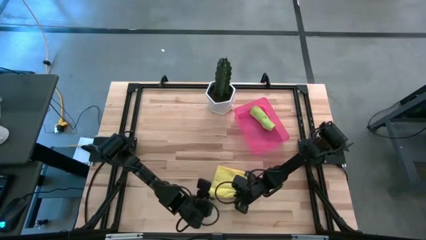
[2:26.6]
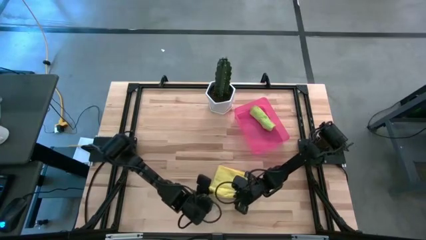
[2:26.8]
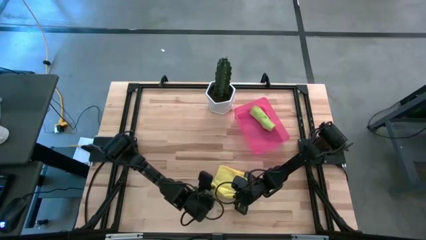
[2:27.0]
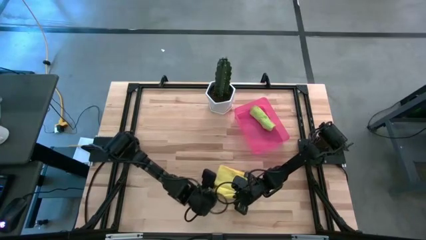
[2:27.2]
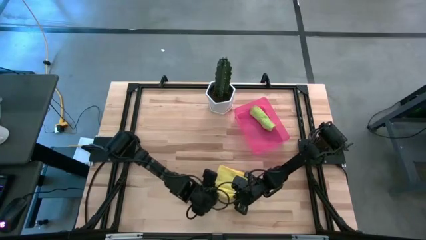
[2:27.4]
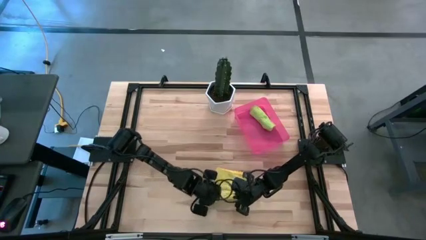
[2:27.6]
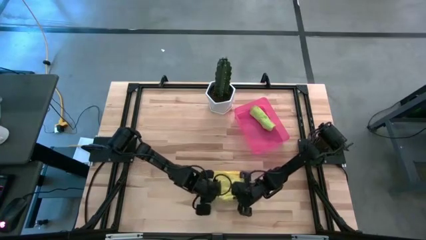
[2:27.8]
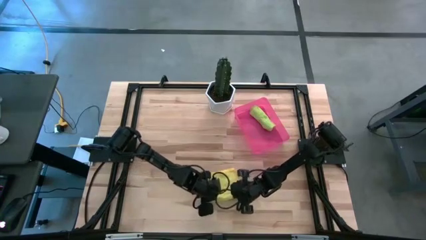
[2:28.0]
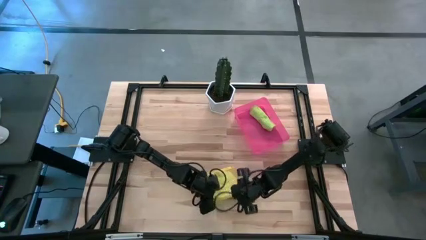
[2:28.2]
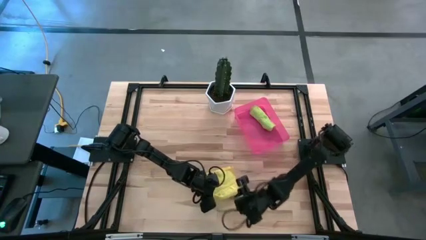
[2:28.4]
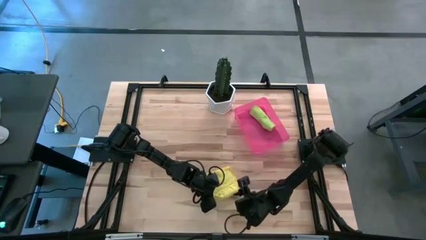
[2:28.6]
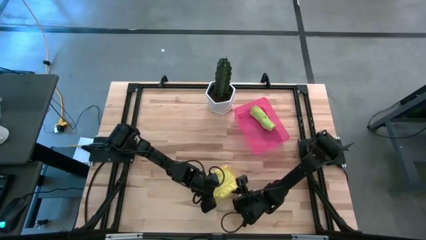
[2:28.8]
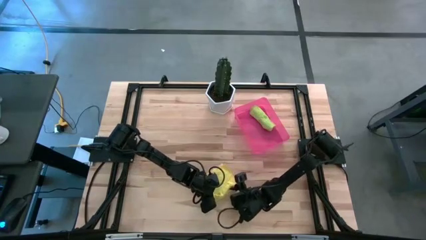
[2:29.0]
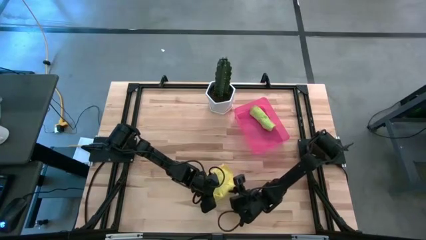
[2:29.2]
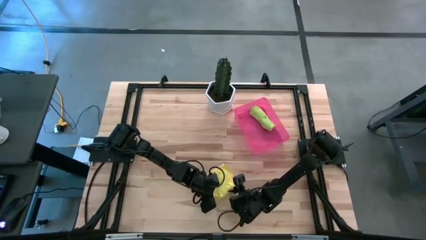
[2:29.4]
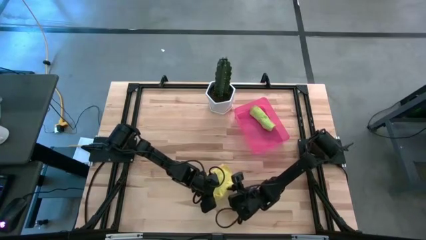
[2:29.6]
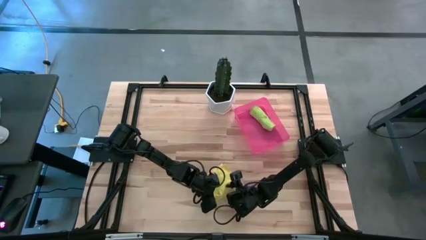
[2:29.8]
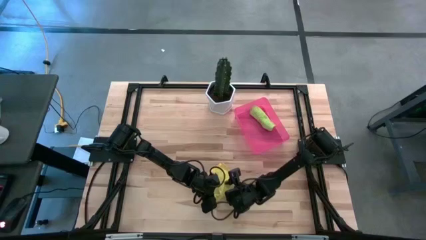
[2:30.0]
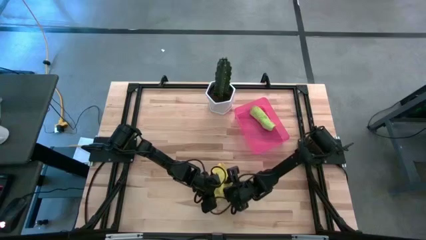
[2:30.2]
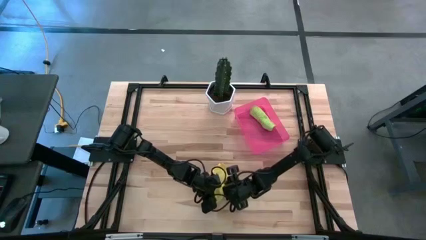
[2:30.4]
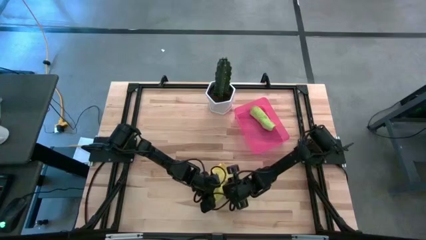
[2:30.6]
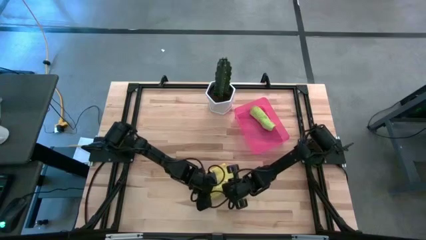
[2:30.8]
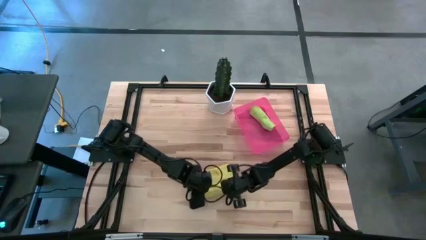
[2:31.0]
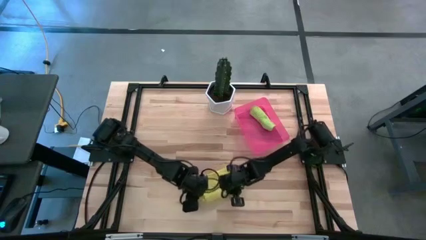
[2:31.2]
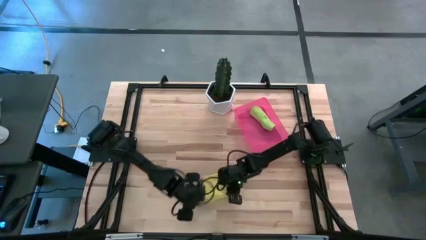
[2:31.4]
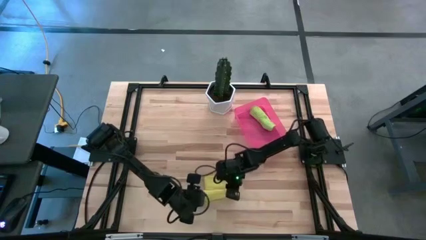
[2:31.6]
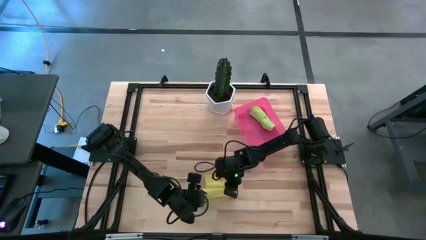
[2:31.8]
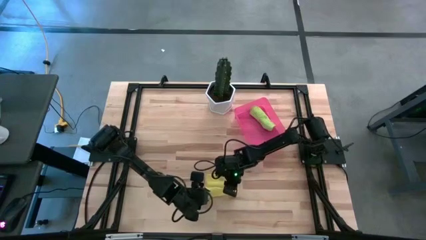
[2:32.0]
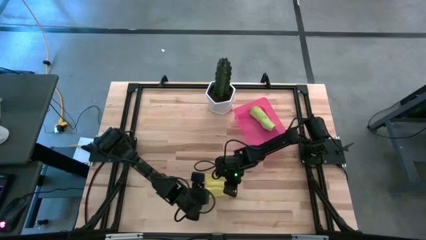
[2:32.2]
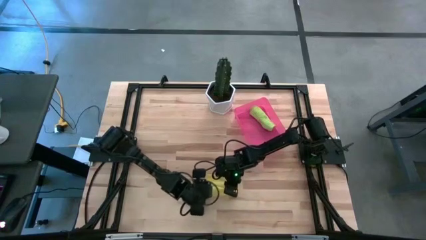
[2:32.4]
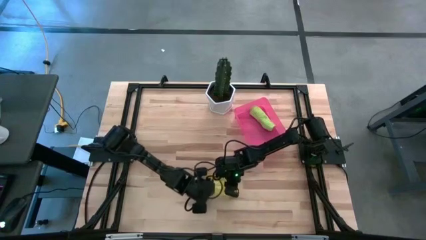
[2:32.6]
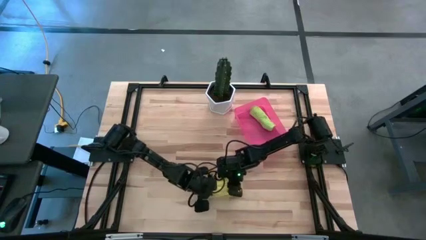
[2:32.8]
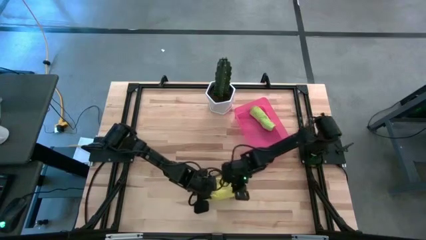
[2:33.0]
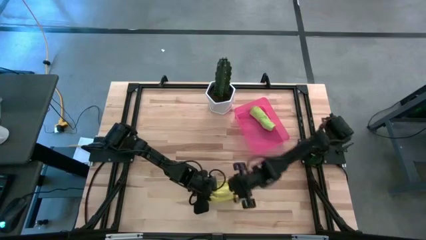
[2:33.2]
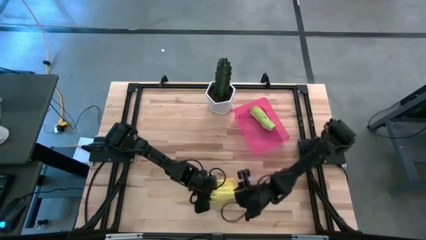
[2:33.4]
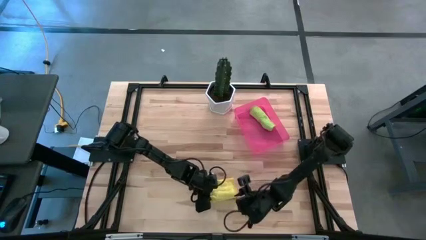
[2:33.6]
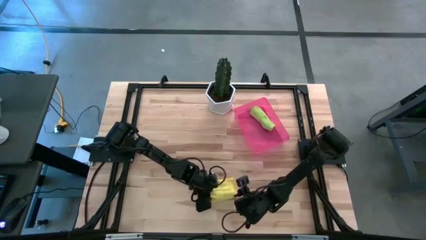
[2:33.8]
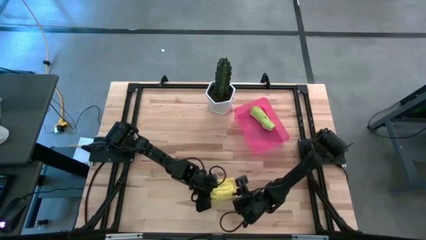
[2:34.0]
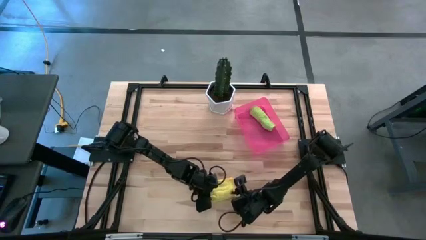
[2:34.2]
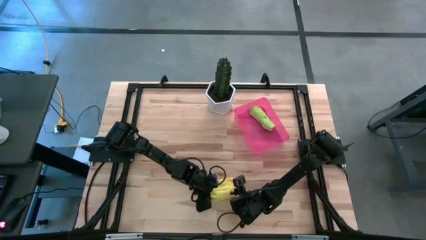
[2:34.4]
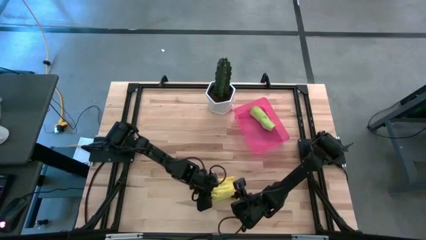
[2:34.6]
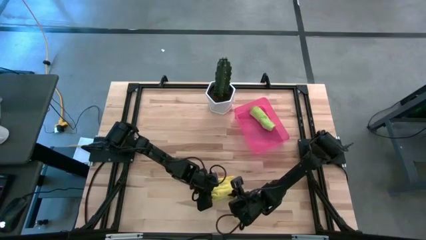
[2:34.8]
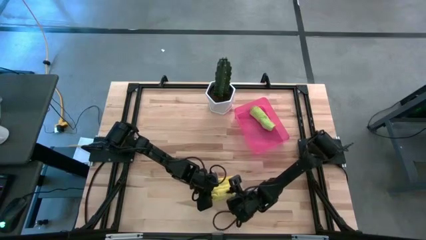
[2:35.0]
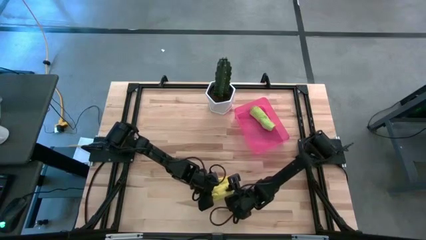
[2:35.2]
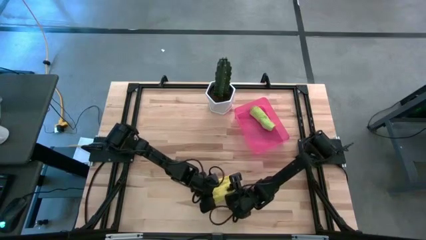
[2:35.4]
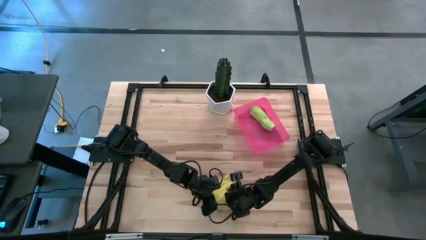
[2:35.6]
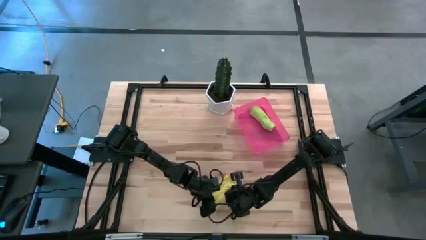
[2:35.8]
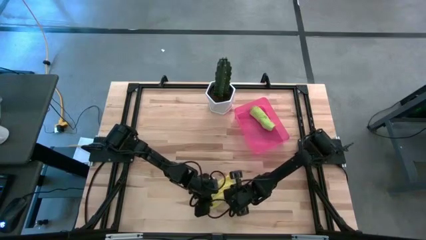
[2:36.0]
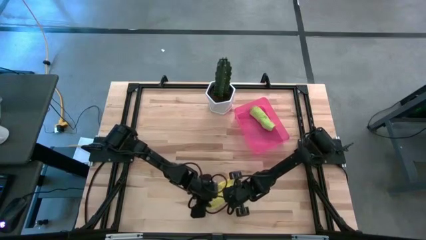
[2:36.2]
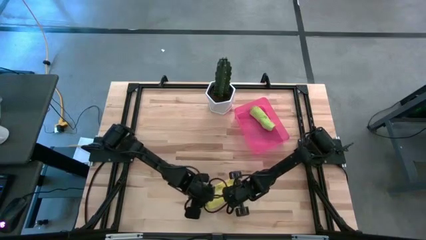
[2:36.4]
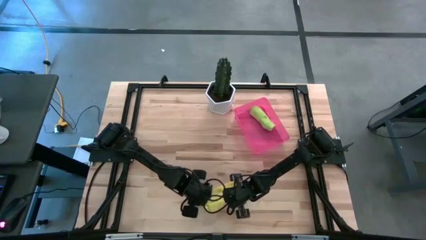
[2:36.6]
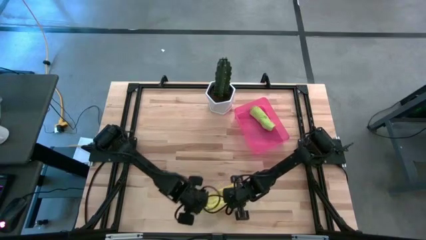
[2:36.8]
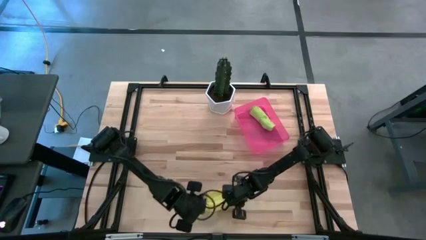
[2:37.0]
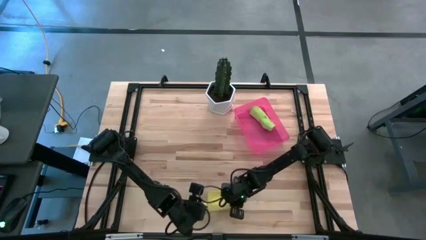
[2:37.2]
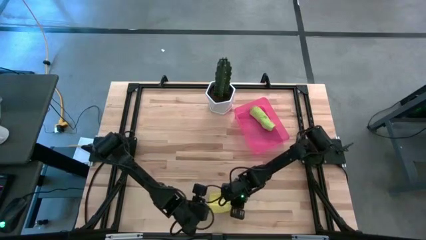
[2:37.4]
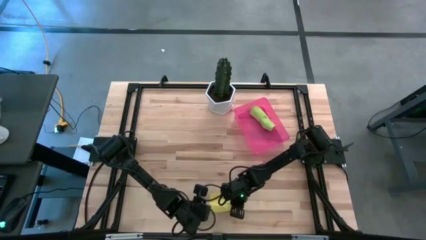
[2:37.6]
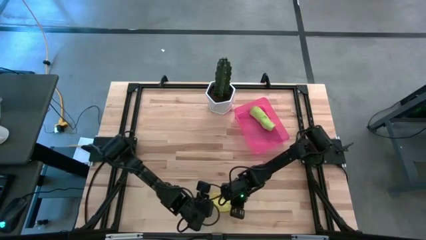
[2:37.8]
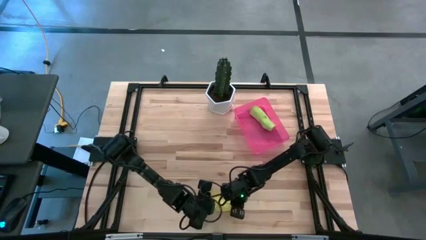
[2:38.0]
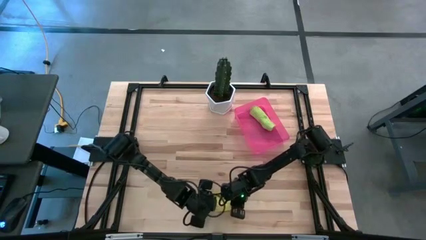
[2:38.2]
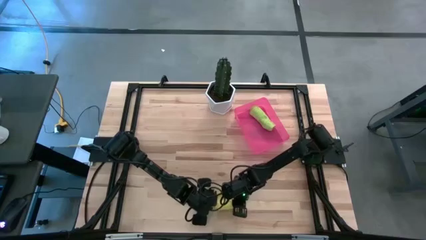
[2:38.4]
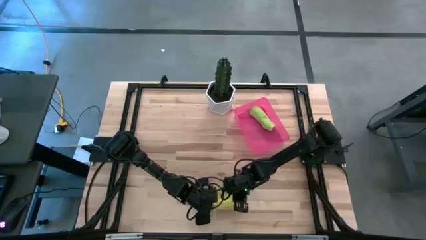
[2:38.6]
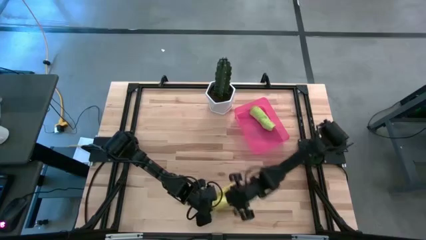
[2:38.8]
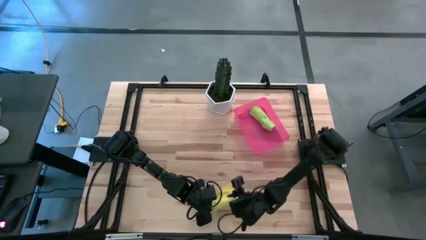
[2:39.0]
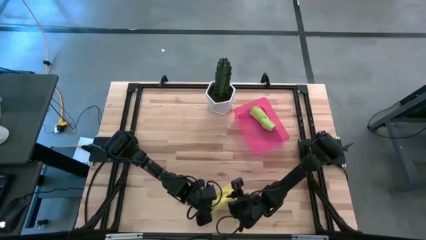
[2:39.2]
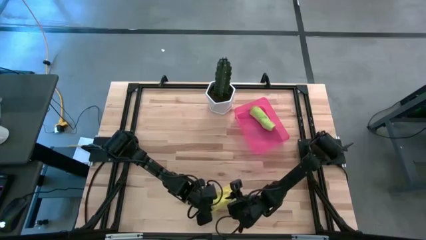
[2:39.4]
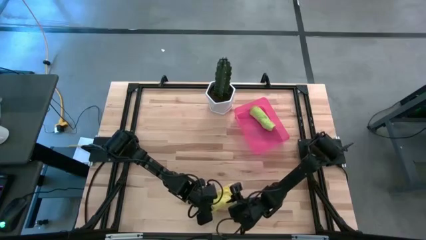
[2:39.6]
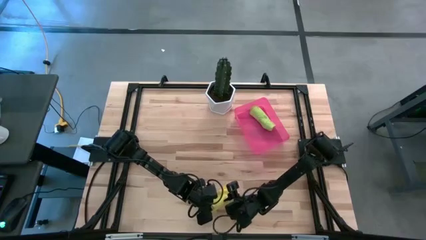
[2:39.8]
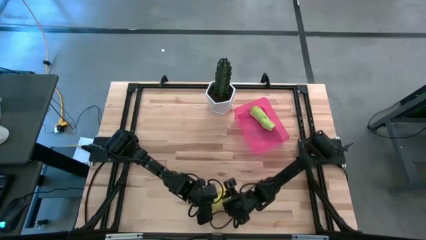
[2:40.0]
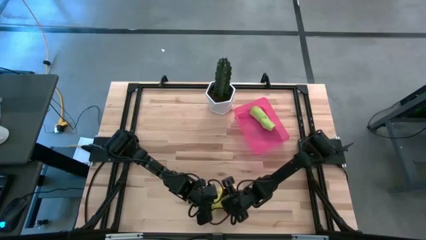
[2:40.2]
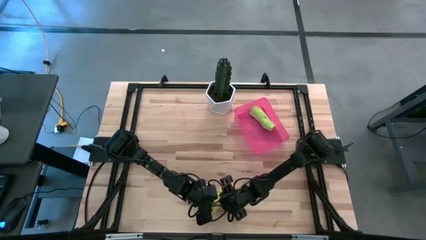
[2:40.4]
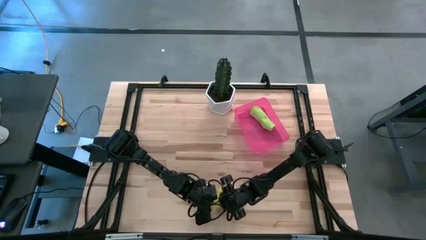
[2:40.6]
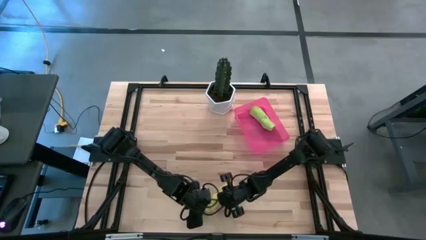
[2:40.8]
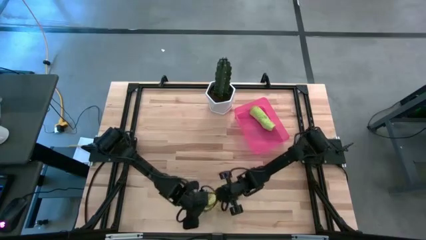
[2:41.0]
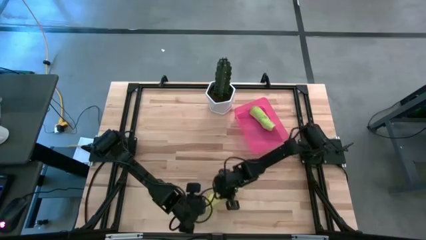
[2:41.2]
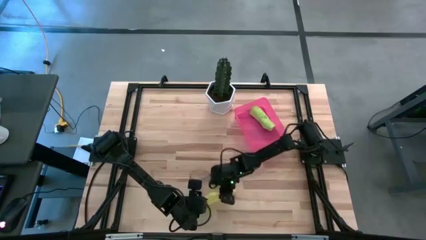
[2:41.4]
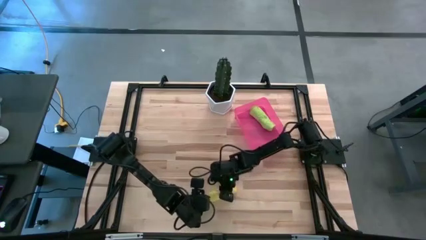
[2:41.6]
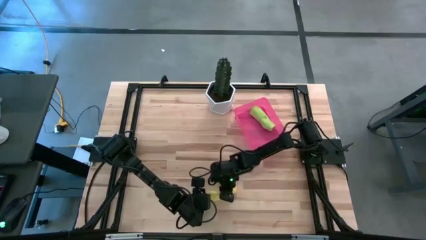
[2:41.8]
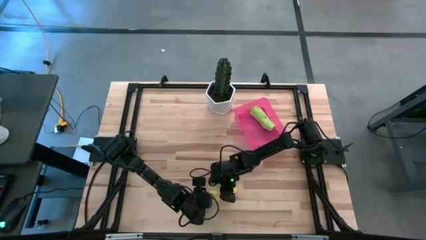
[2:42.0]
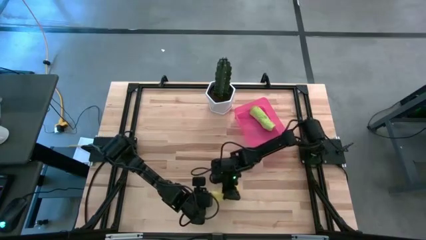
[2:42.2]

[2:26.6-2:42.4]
Task: Roll microfiber towels into tight, uniform cylinder then place into a basket
Roll the yellow towel
